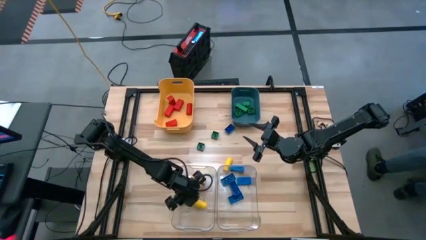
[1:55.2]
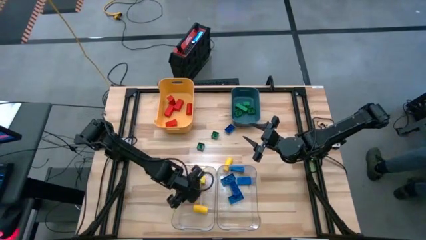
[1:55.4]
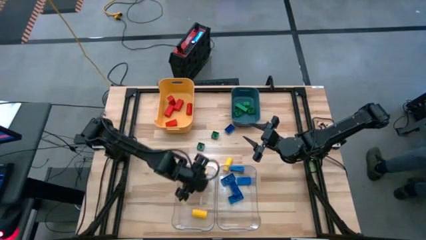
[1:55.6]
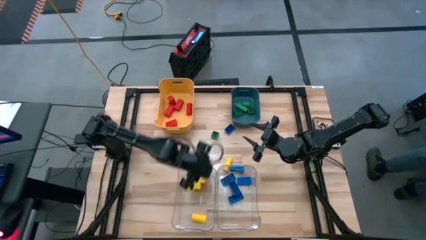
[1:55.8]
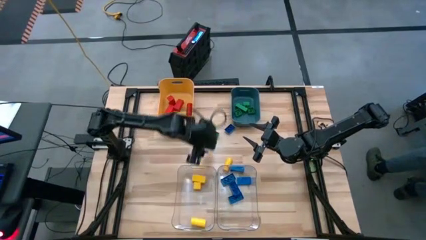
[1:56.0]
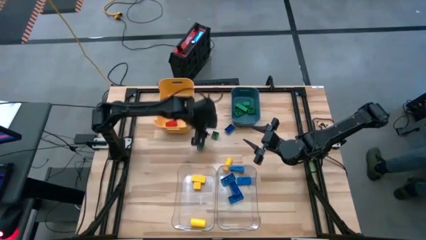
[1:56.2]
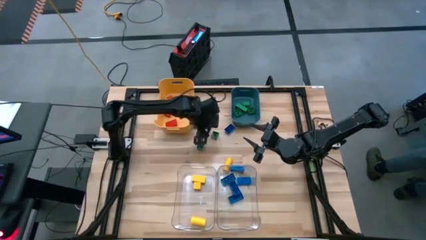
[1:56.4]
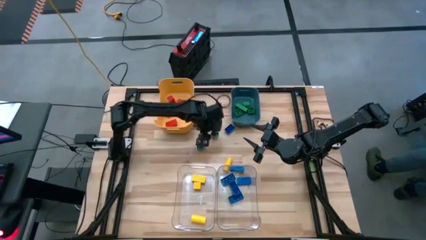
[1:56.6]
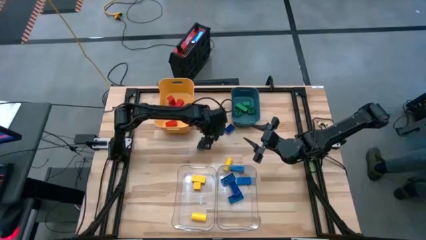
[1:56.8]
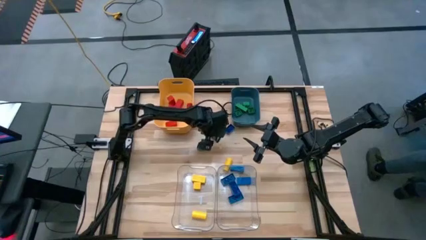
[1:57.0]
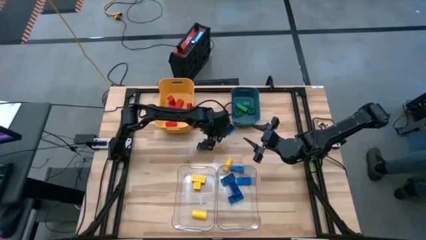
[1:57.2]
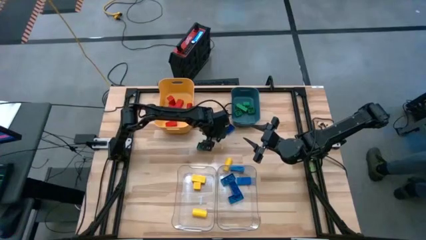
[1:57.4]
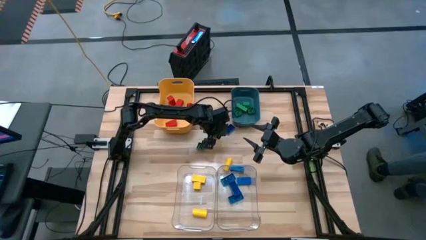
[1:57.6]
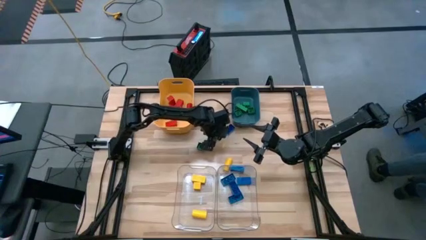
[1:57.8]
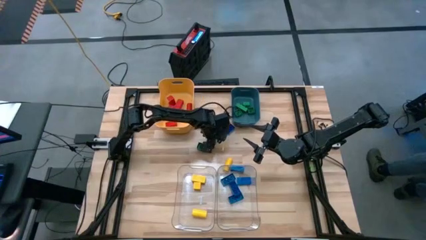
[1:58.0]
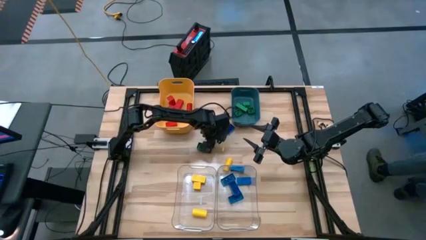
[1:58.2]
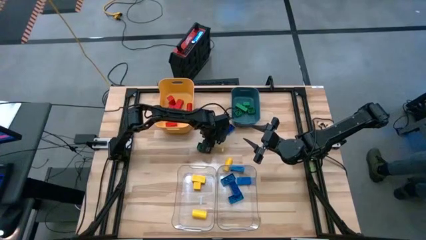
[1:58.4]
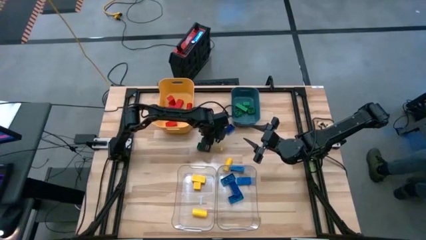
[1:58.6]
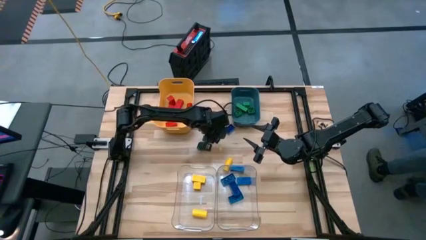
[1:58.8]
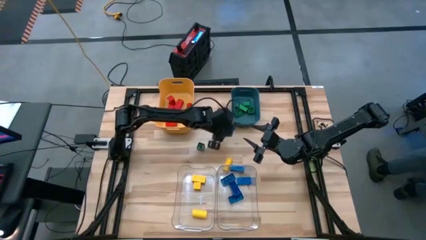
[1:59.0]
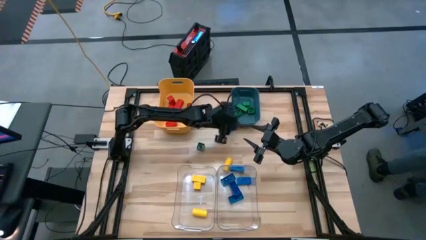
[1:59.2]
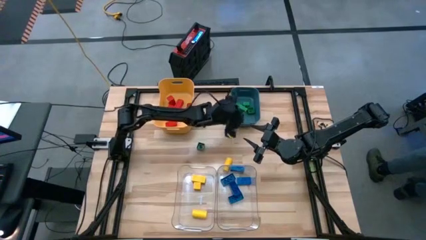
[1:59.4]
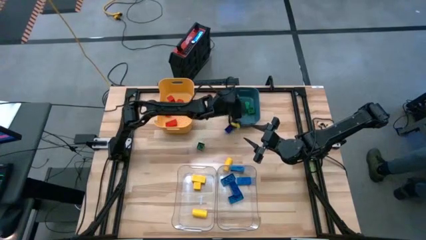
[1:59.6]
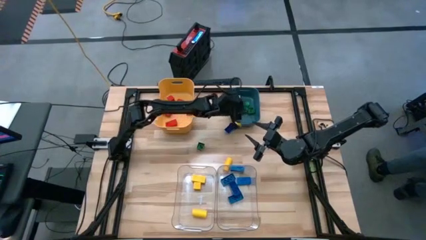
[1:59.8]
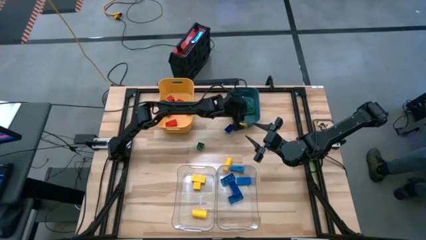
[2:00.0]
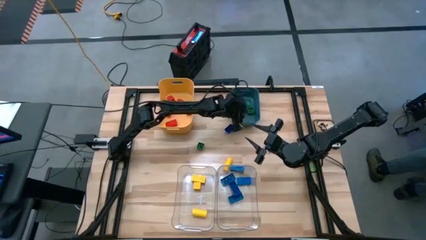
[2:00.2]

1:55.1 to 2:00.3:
Task: Sort blocks
Put the green block into the blue bin

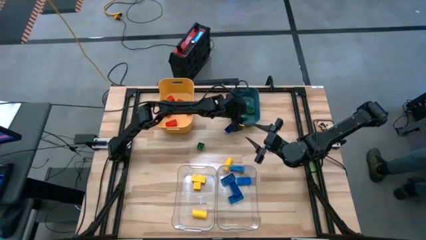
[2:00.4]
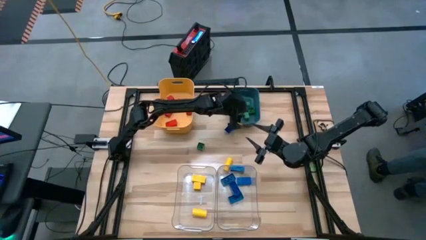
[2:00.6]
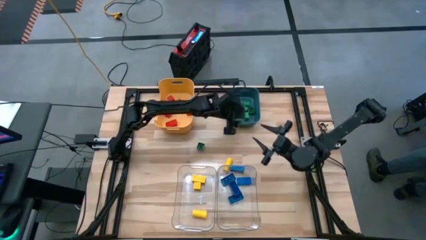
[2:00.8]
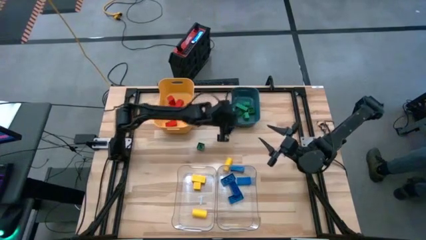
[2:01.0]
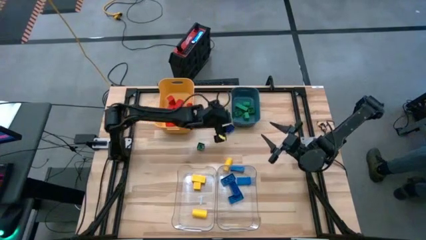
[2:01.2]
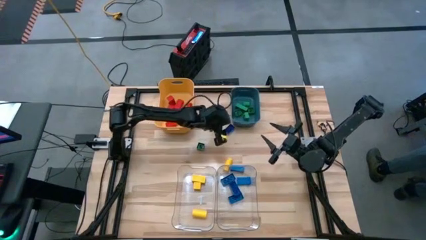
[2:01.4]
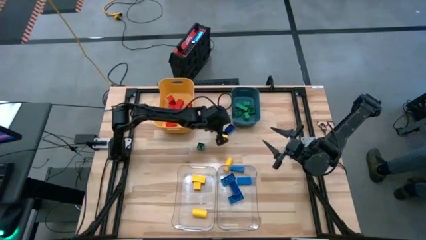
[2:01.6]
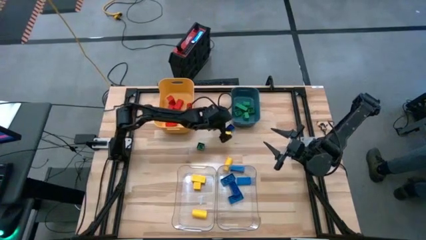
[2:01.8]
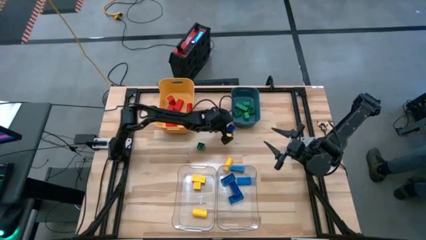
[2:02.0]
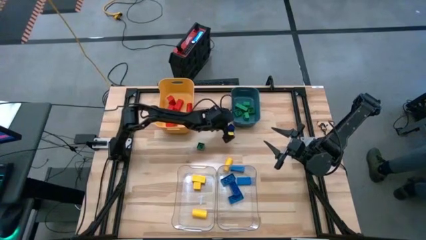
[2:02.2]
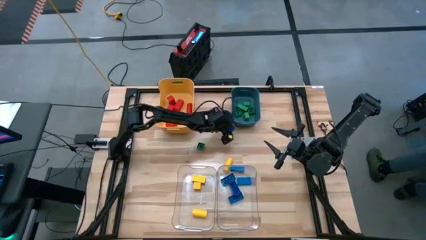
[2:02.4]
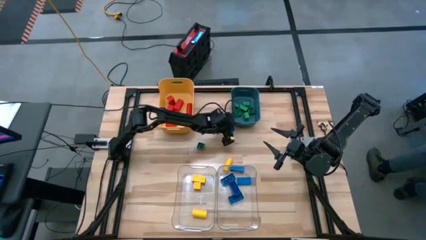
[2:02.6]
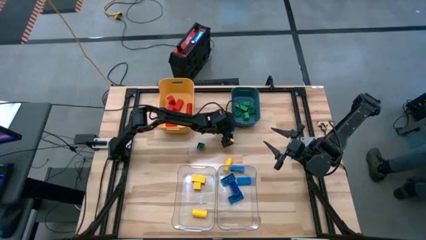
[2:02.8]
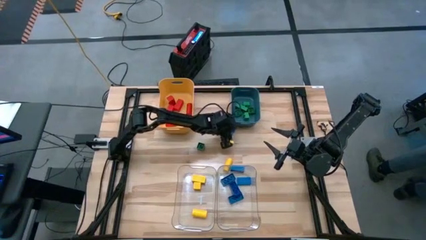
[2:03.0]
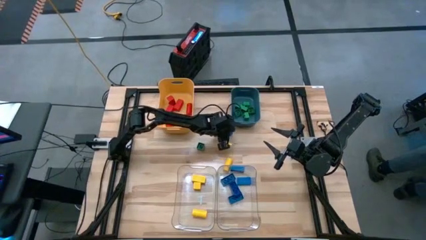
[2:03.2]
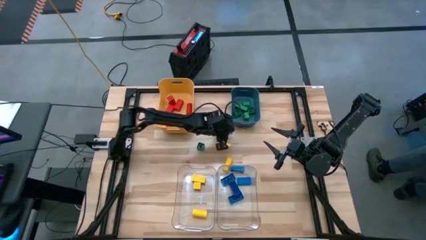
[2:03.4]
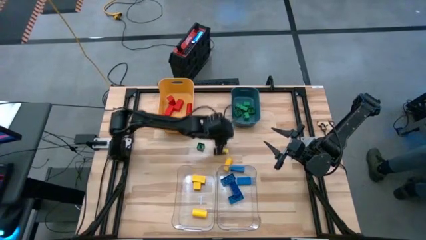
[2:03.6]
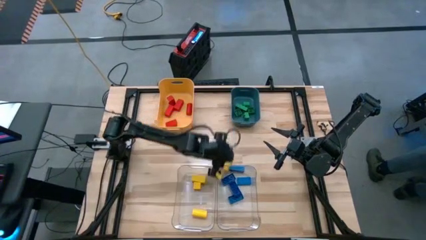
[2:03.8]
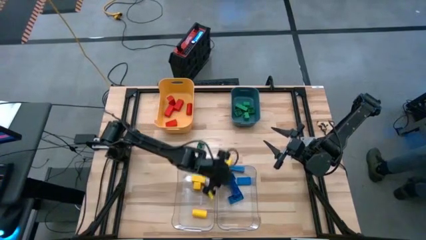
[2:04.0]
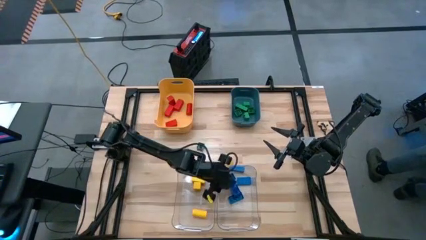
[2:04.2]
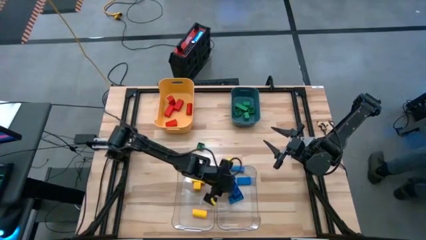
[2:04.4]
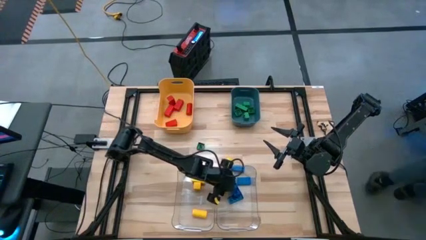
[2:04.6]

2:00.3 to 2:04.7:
Put the blue game piece into the right transparent bin

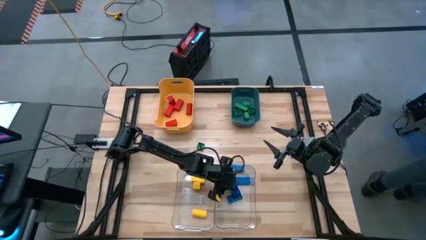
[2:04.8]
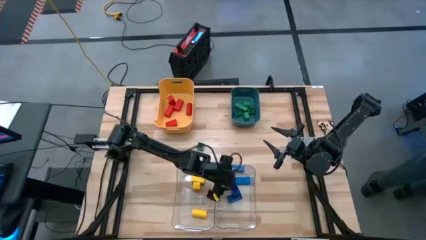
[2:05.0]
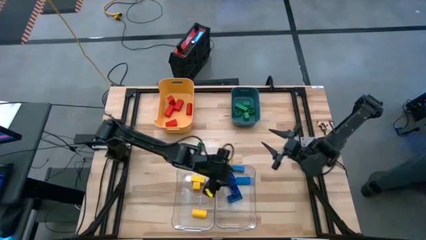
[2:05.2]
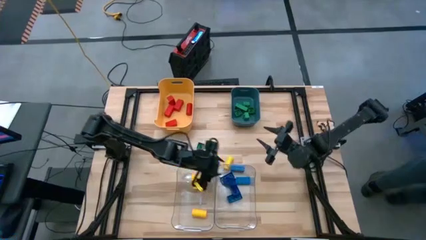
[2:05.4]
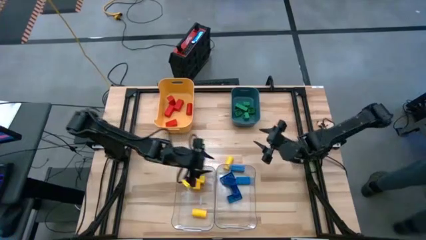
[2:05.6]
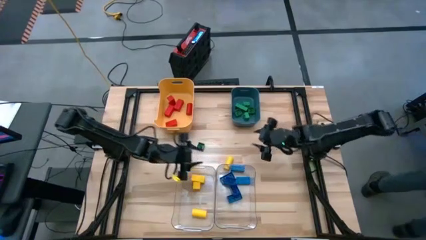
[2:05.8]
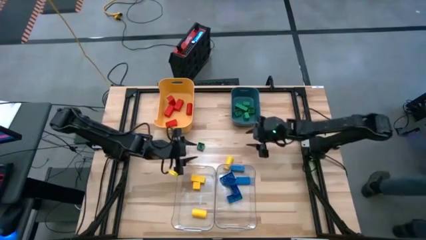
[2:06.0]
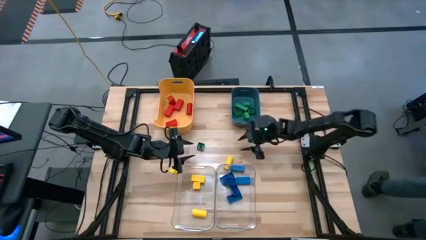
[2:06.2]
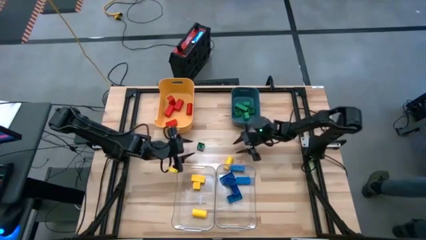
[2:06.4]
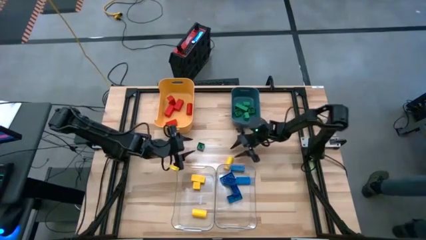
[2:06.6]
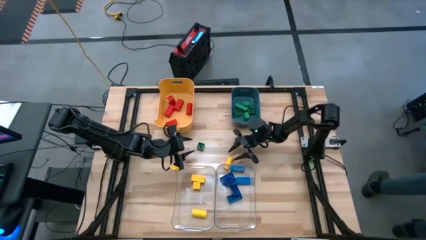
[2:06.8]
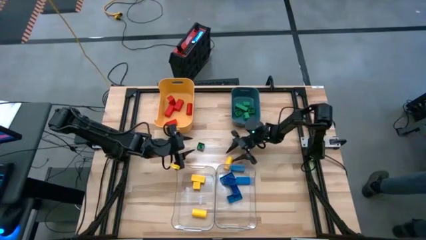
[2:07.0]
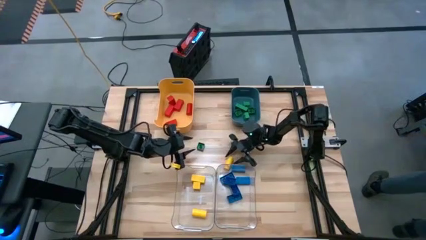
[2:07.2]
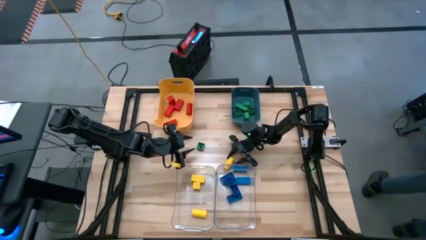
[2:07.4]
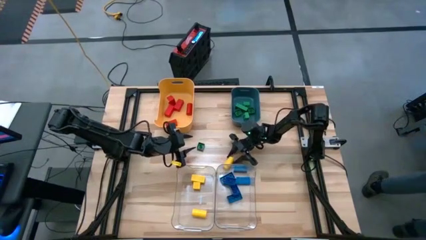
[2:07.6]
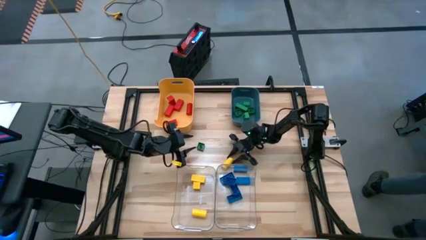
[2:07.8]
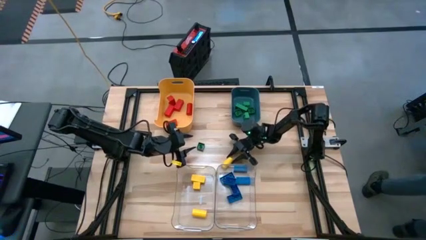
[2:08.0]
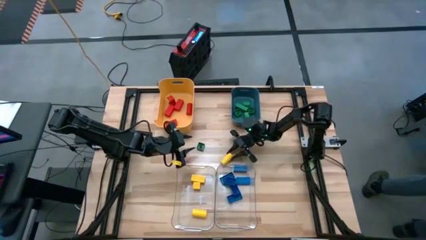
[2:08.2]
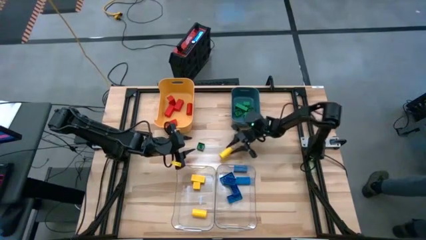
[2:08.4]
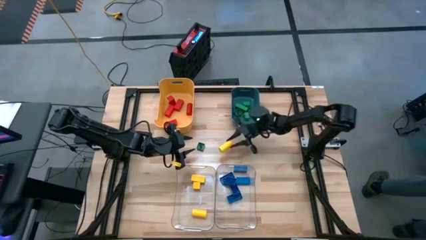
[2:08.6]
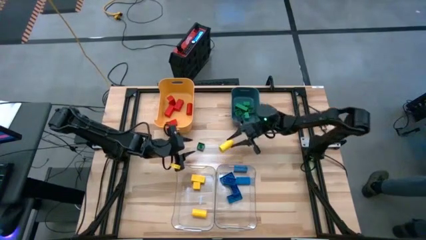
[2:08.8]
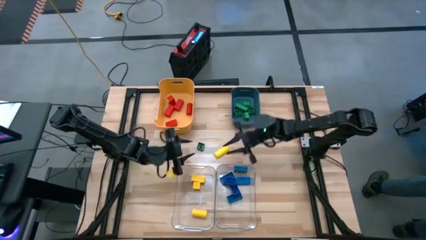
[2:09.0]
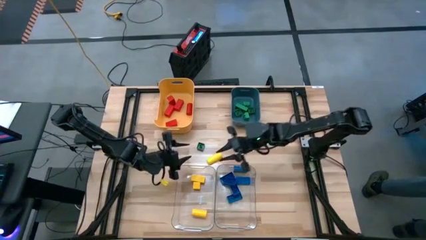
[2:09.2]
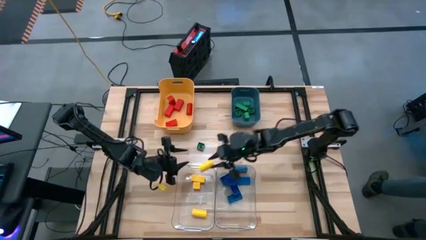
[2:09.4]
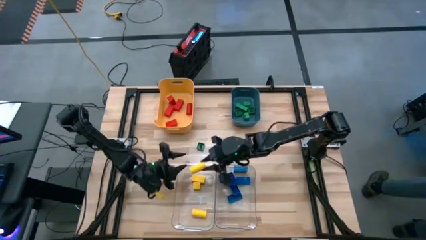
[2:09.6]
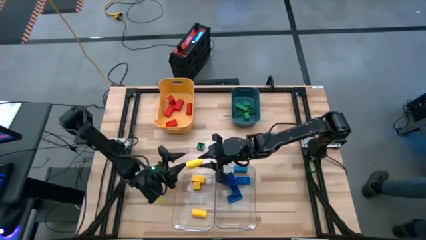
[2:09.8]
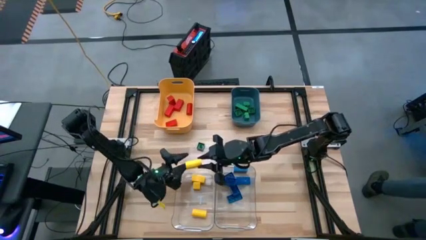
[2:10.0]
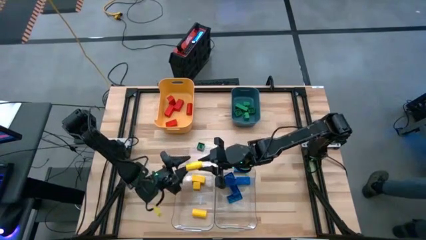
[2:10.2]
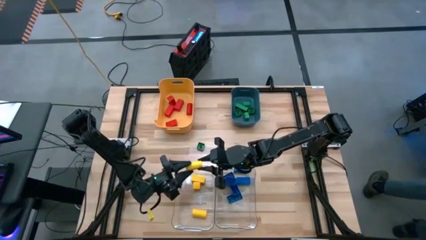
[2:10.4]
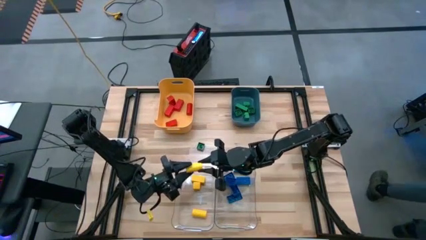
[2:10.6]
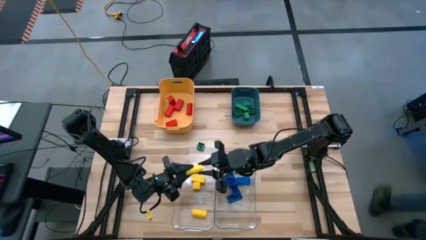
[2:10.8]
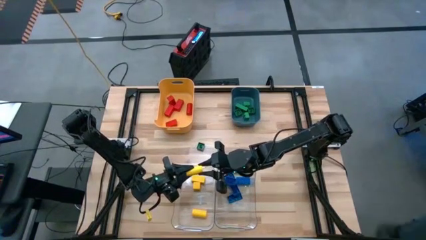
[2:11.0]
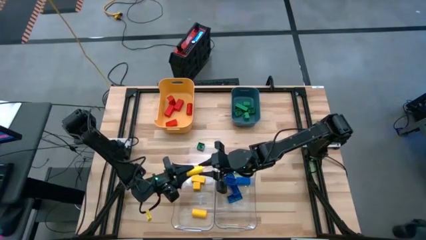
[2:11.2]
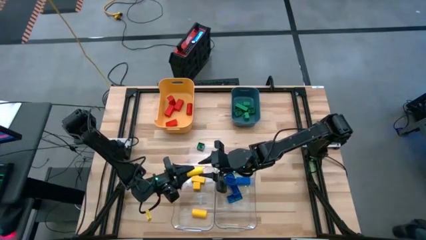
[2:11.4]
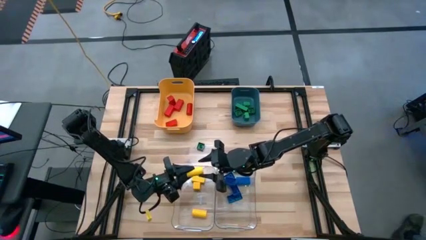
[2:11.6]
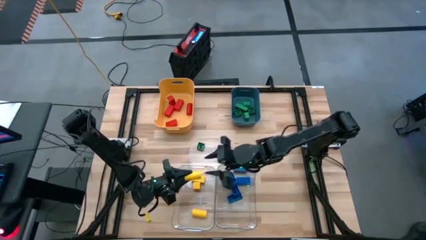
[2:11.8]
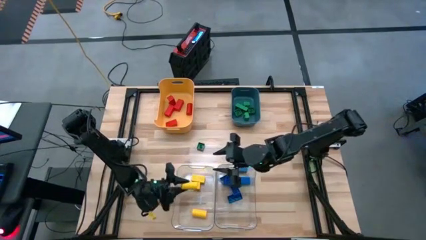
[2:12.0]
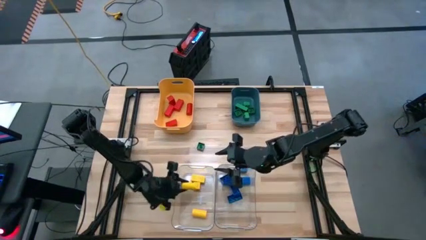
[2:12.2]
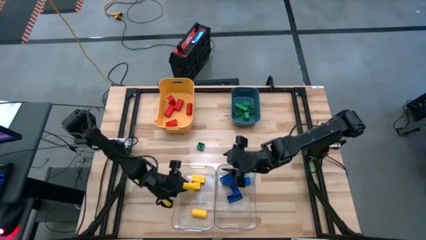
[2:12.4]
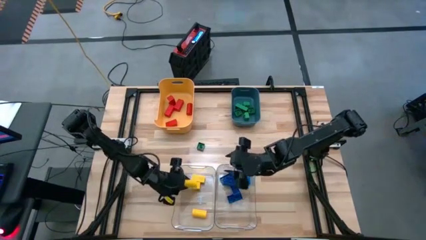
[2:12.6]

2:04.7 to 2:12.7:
Put the yellow block into the left transparent bin
